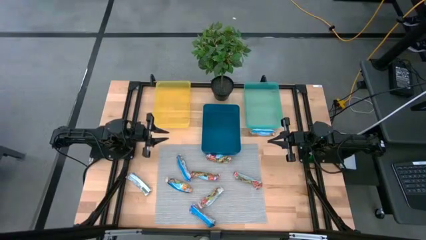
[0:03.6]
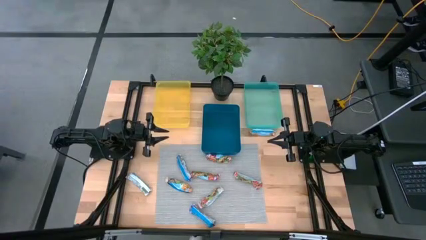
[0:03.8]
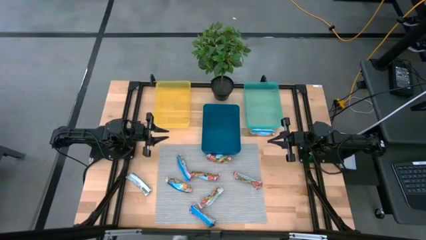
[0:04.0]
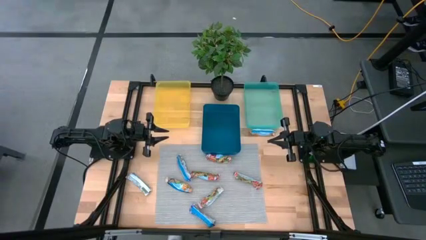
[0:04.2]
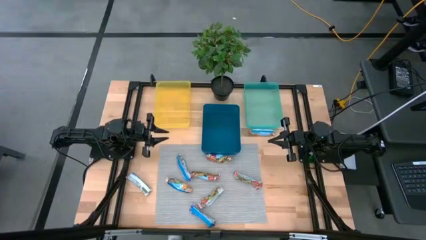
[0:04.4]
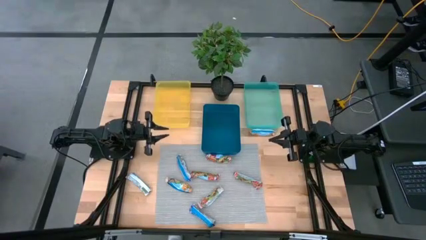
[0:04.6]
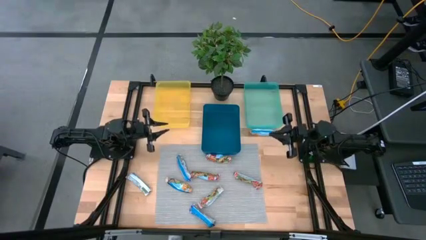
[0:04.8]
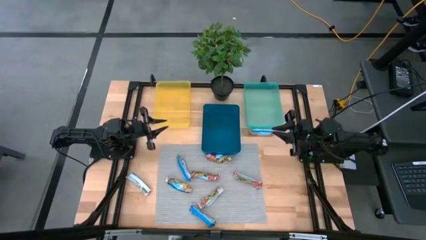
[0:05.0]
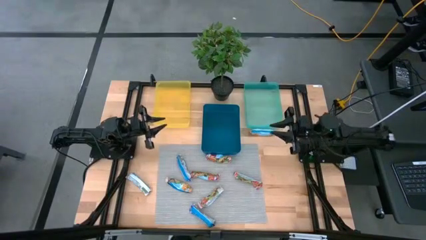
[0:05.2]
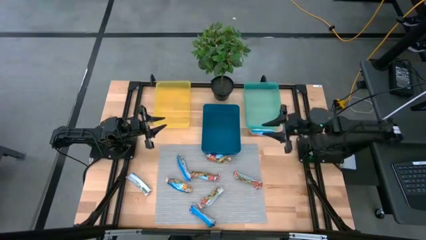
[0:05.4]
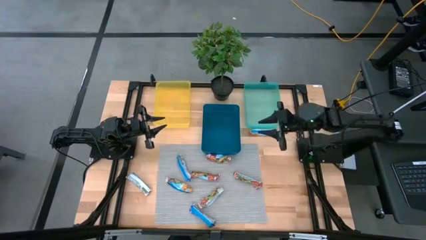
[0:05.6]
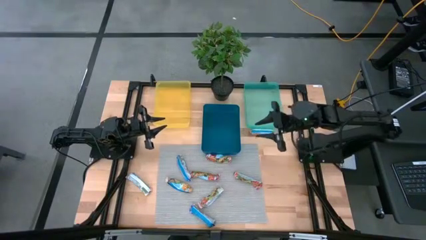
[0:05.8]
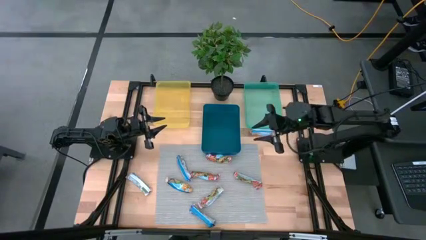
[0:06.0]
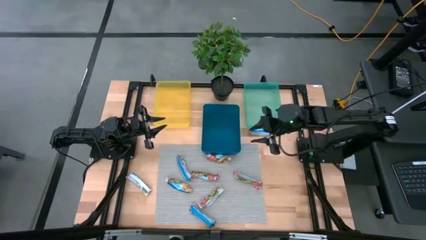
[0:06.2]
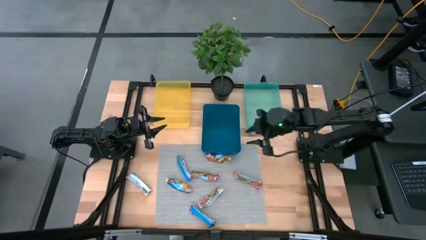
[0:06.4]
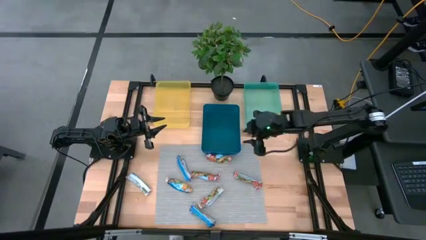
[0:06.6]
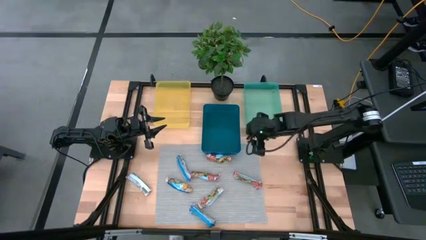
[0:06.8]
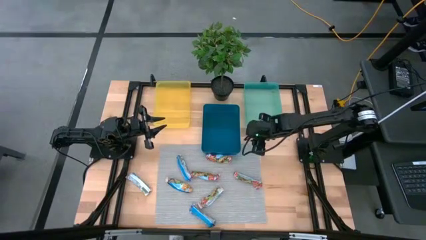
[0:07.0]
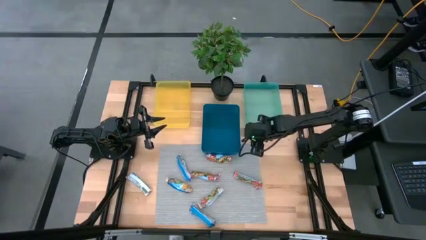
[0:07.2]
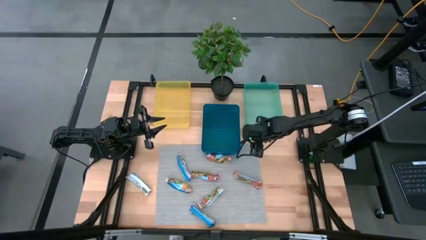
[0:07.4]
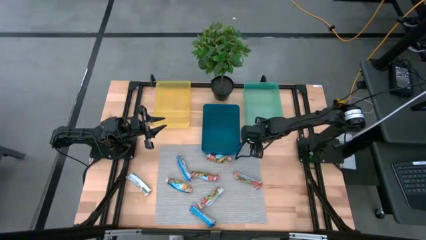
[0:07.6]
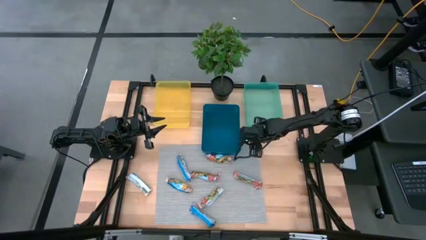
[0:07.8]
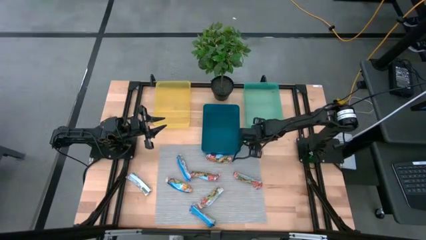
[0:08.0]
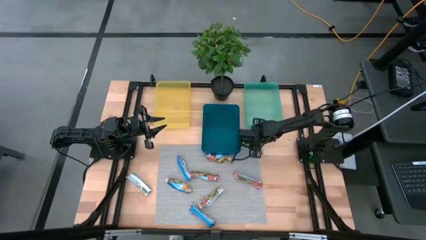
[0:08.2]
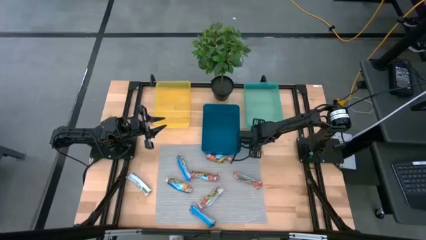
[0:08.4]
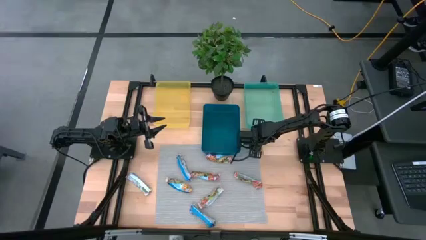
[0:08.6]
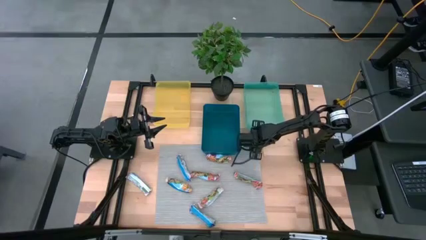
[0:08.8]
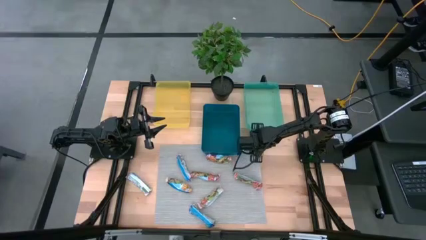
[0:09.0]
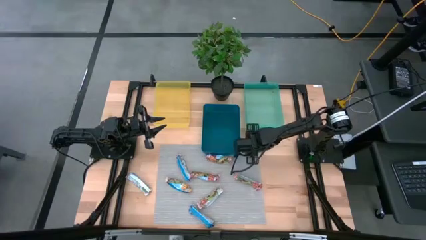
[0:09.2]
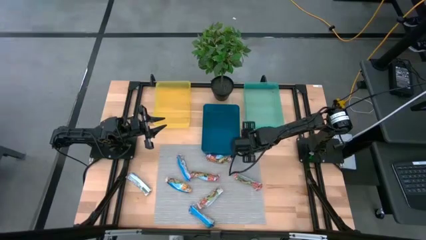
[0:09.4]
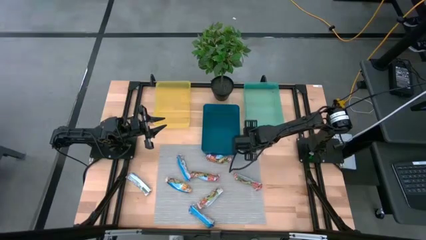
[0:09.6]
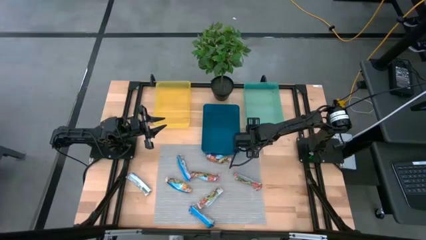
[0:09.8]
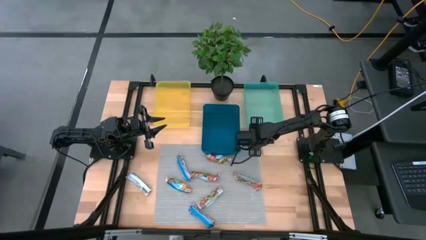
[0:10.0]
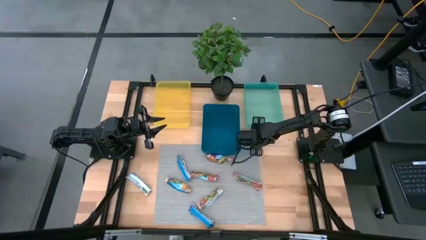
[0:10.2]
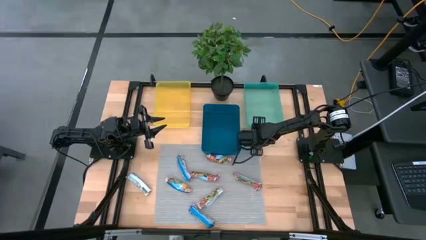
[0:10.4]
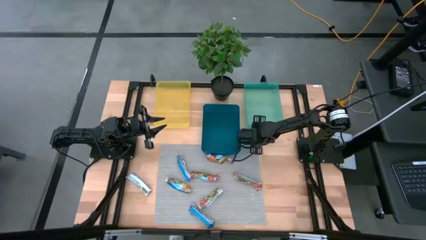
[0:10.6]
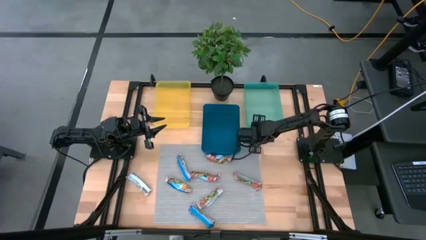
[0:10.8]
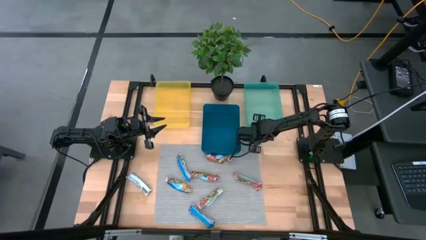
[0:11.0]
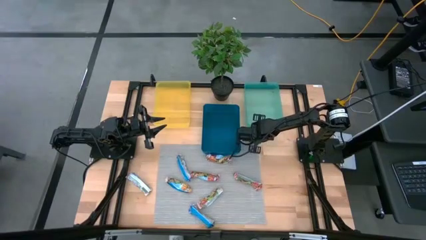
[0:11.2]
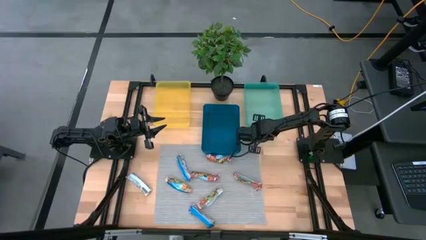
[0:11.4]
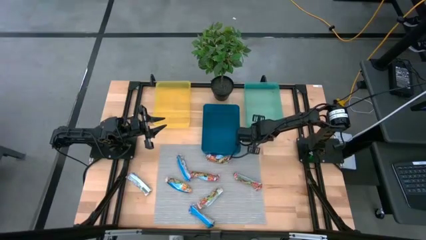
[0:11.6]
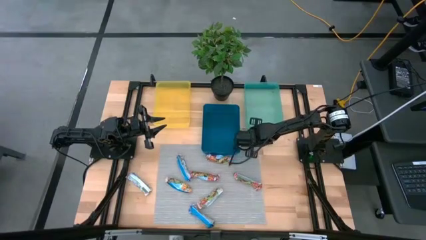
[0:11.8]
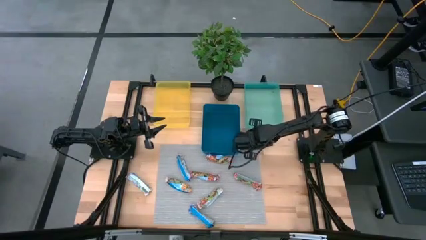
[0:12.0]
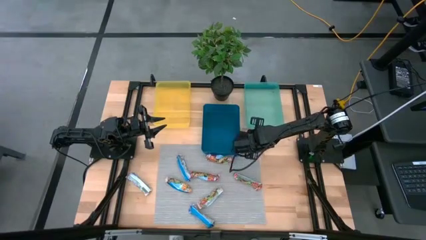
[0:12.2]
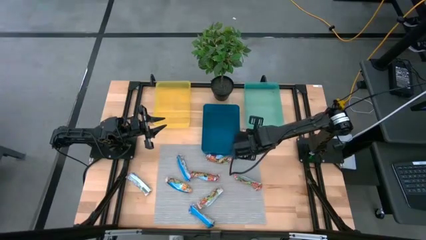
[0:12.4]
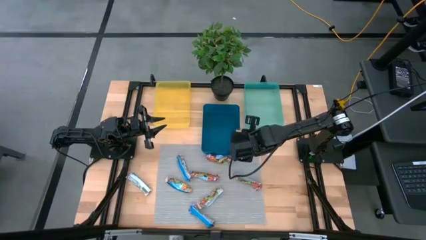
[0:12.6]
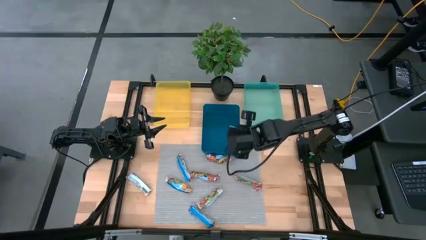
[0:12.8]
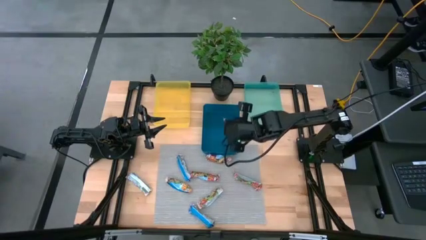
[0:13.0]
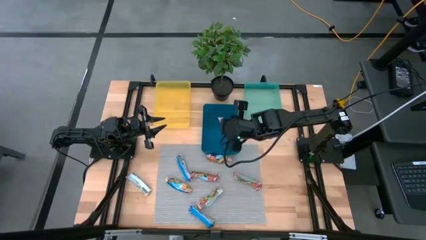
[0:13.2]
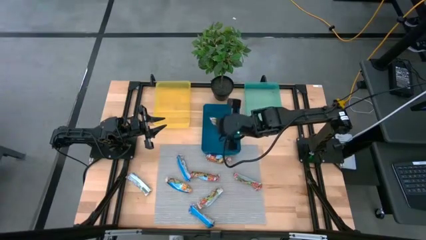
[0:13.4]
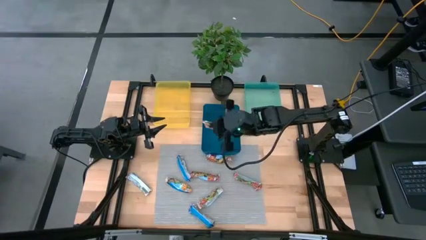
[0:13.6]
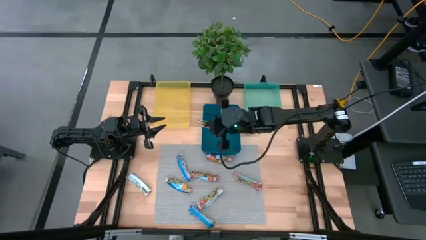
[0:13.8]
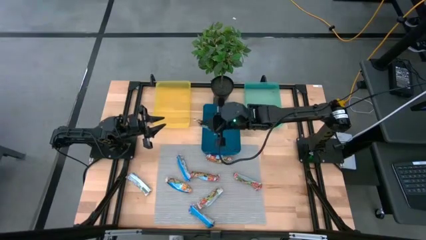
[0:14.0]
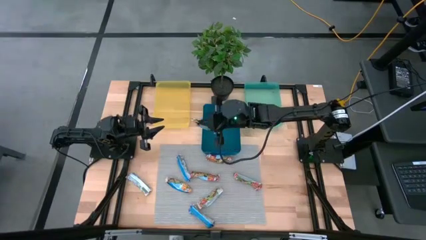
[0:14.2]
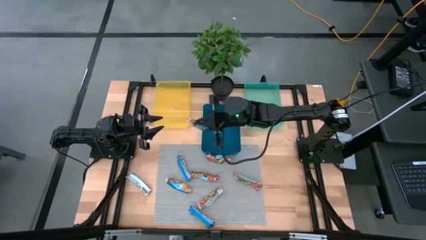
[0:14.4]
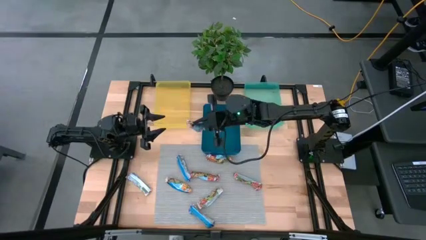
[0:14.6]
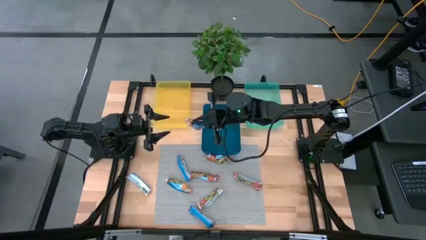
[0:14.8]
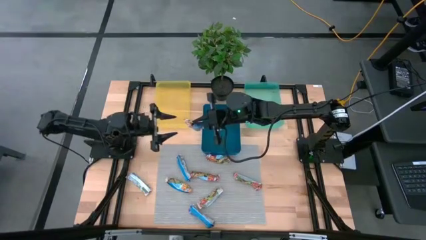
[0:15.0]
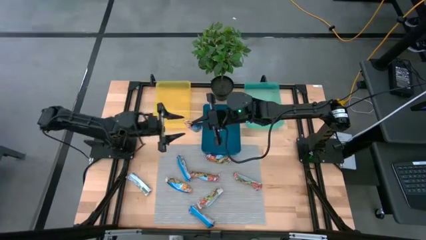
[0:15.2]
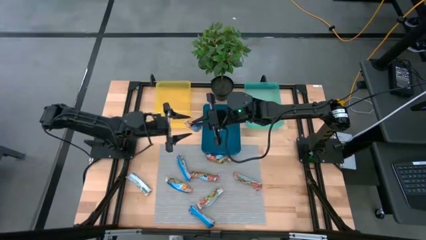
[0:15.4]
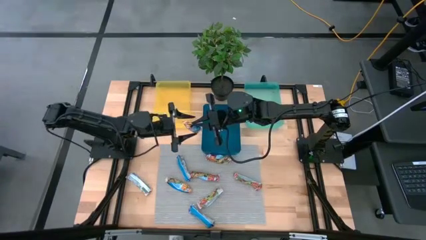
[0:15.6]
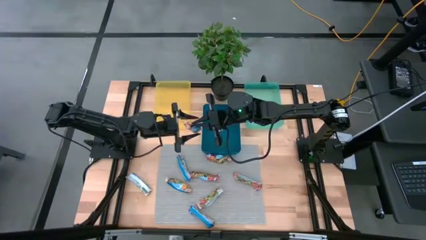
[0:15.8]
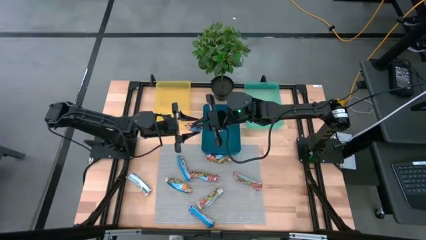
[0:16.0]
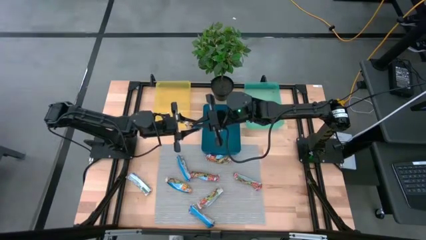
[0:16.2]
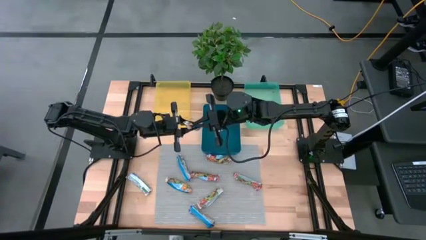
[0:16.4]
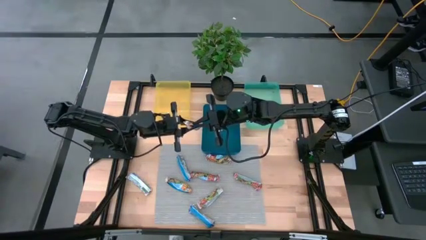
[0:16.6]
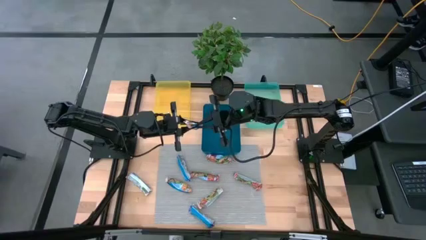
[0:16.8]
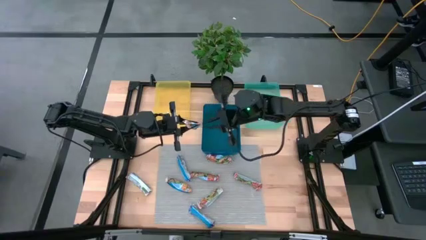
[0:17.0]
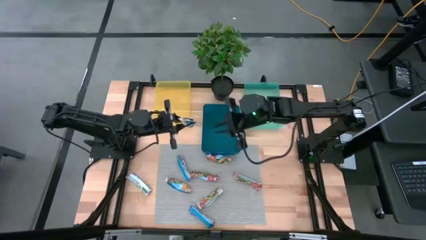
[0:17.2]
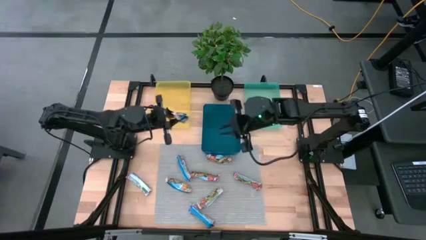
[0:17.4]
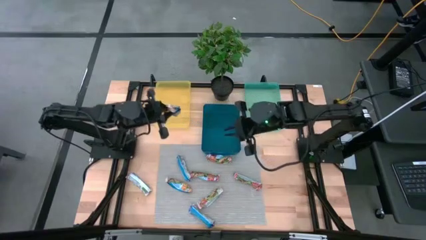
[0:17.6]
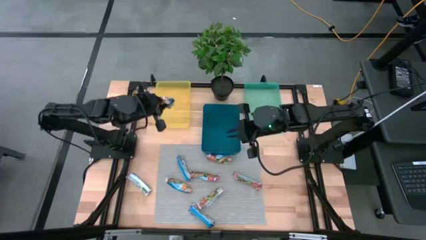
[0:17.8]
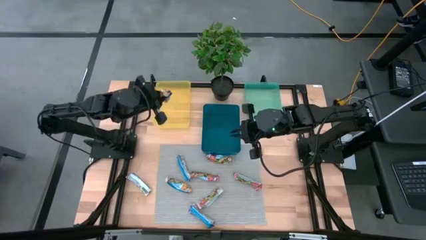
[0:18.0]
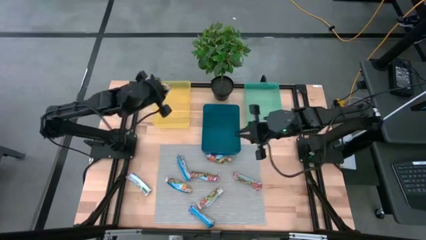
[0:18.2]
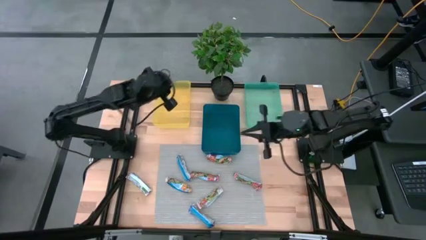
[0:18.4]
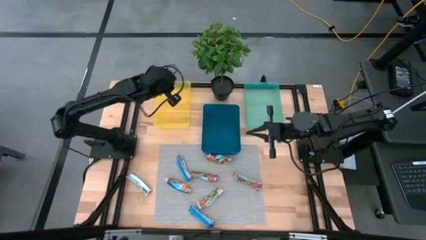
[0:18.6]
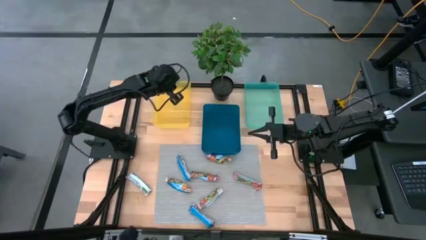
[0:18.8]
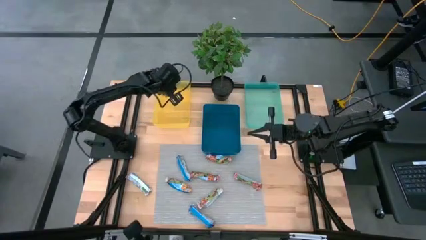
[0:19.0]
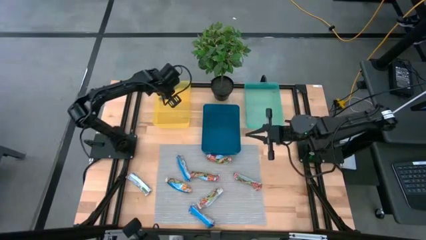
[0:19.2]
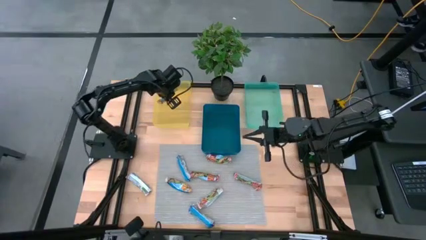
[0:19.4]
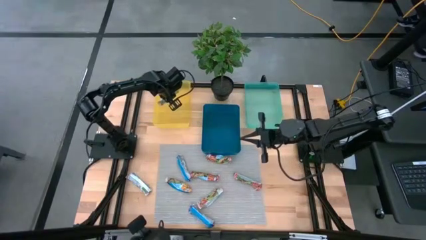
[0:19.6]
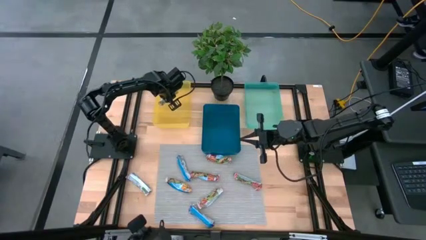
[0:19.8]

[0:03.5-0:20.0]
Task: Pick and place Granola Bars by type
Put the orange granola bar into the yellow bin
